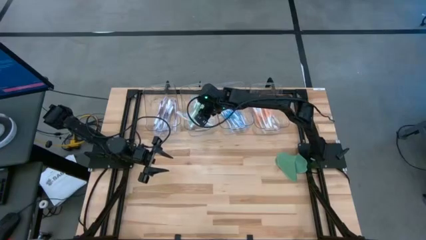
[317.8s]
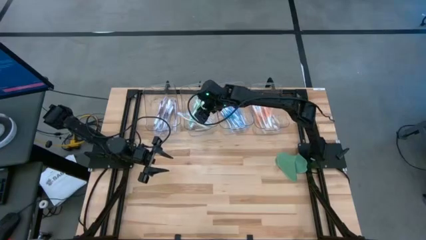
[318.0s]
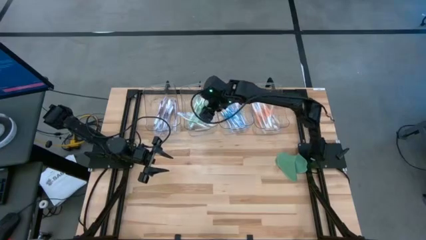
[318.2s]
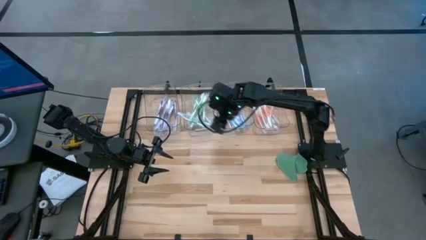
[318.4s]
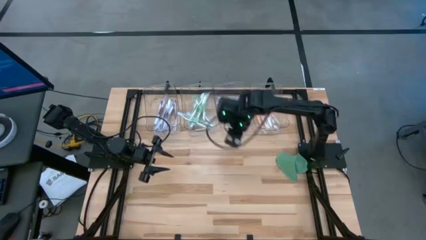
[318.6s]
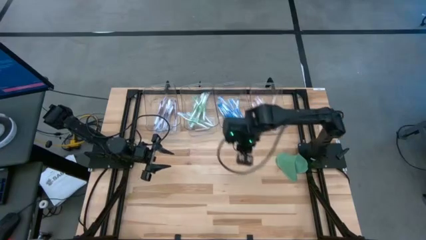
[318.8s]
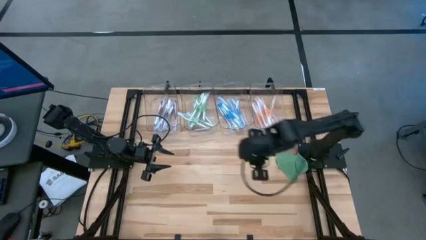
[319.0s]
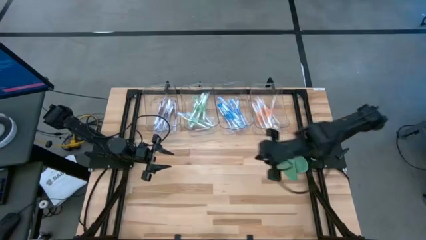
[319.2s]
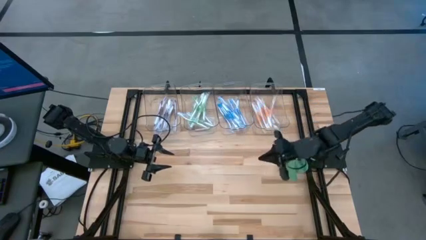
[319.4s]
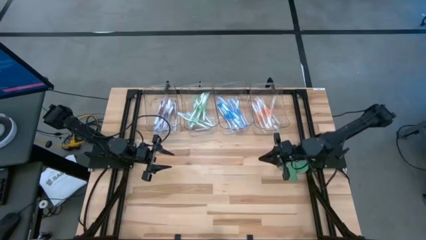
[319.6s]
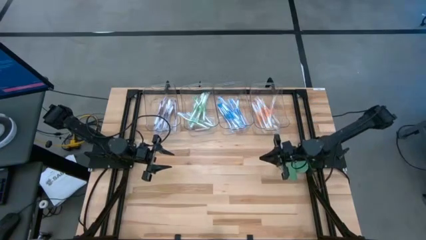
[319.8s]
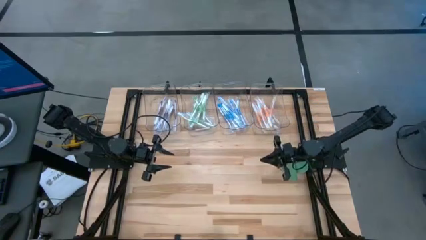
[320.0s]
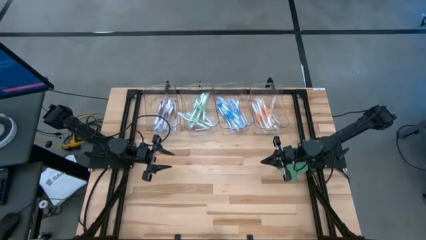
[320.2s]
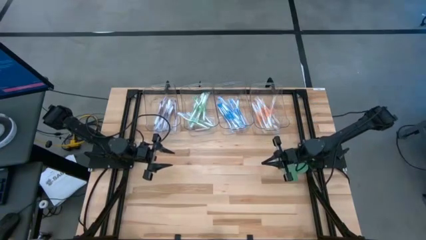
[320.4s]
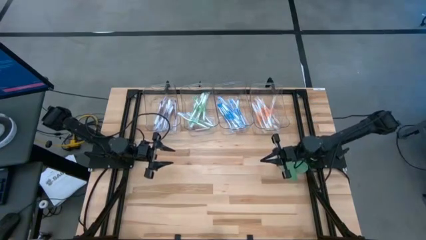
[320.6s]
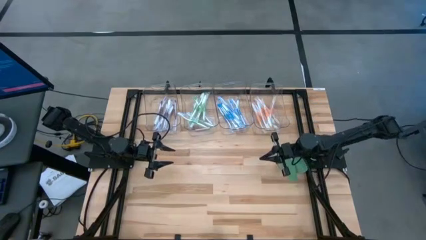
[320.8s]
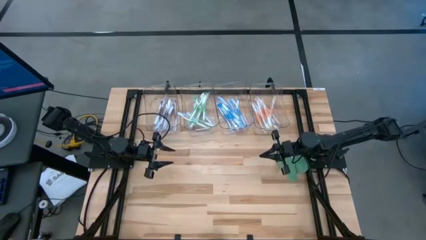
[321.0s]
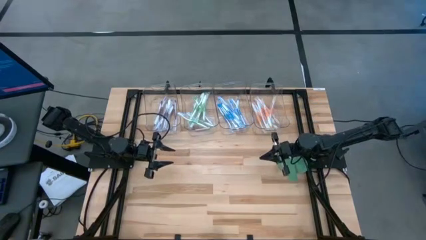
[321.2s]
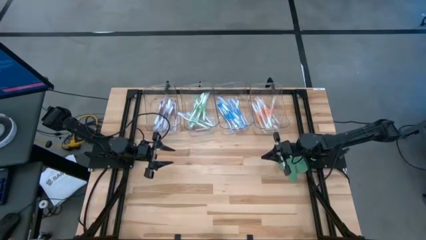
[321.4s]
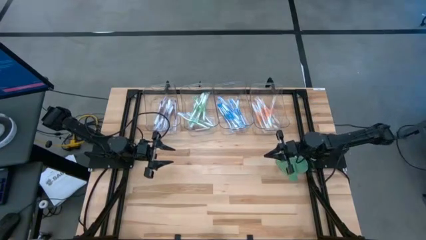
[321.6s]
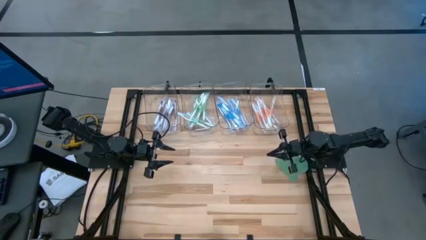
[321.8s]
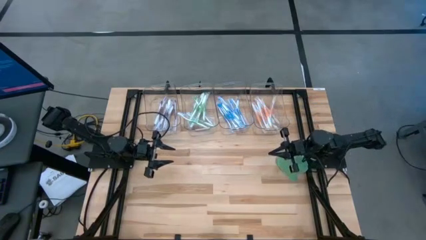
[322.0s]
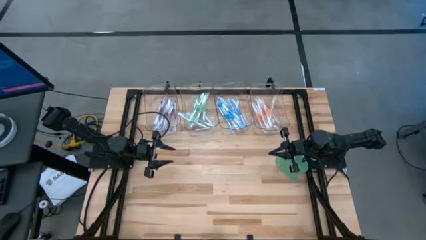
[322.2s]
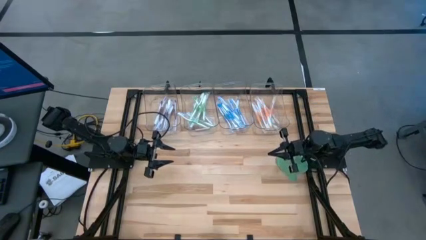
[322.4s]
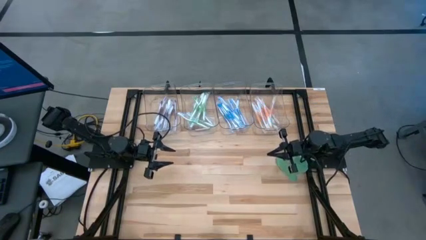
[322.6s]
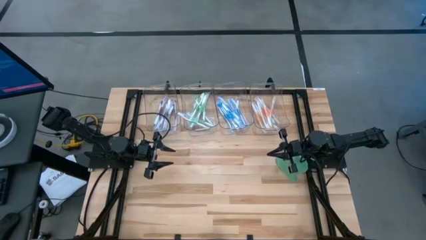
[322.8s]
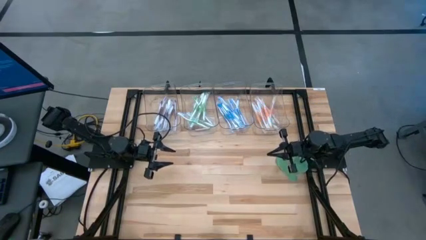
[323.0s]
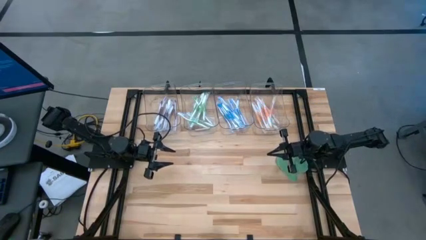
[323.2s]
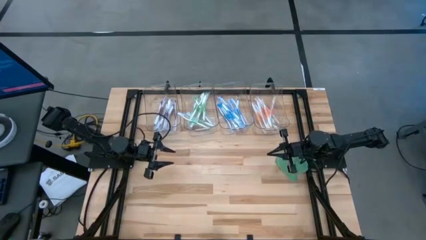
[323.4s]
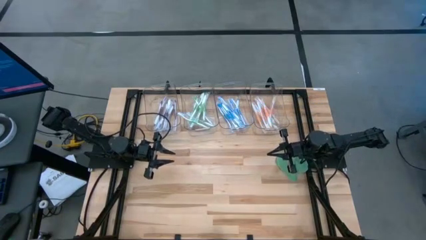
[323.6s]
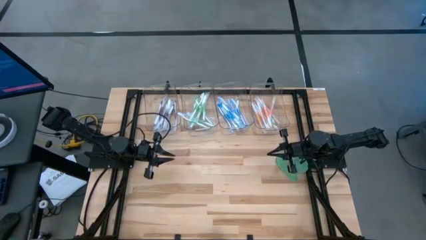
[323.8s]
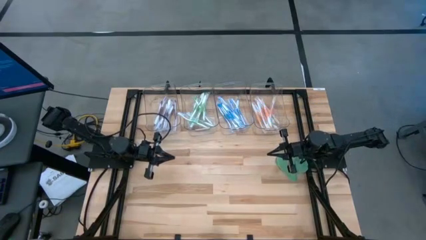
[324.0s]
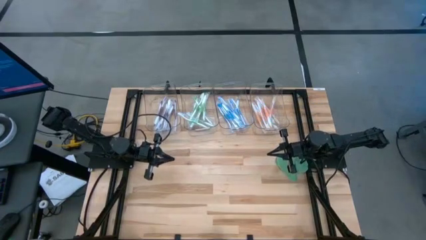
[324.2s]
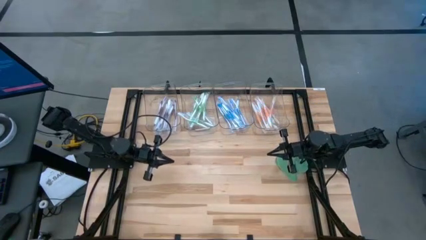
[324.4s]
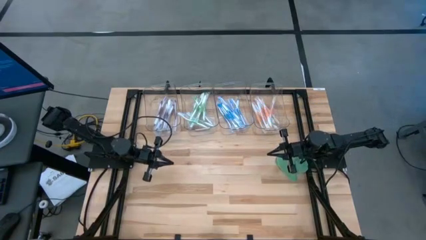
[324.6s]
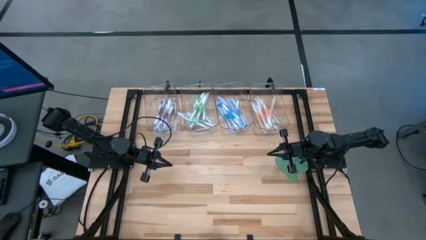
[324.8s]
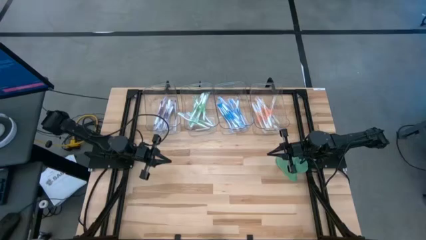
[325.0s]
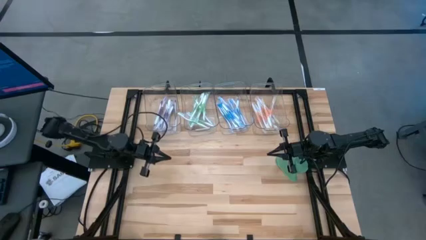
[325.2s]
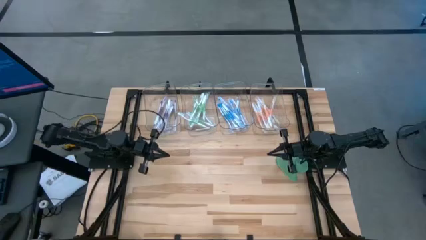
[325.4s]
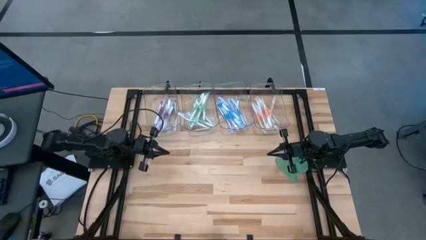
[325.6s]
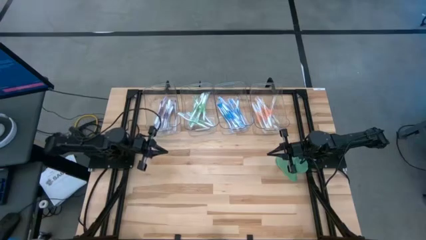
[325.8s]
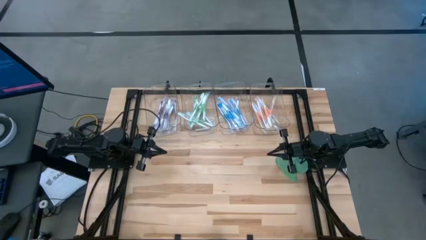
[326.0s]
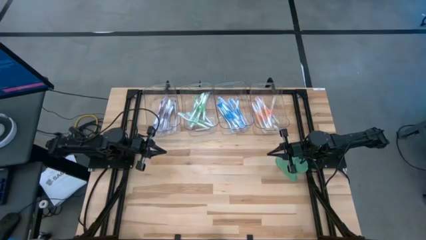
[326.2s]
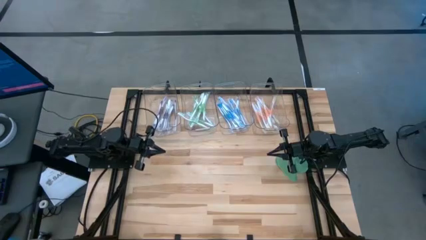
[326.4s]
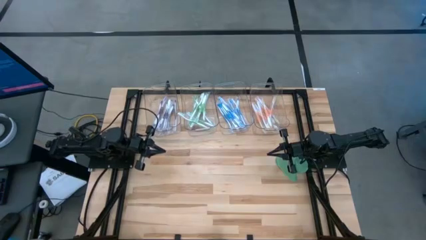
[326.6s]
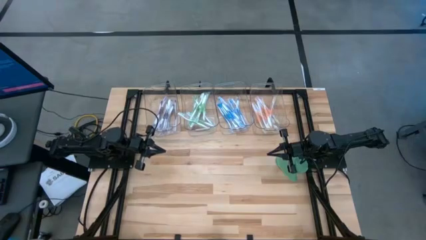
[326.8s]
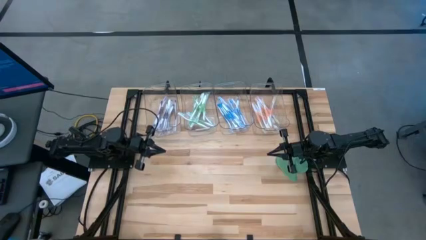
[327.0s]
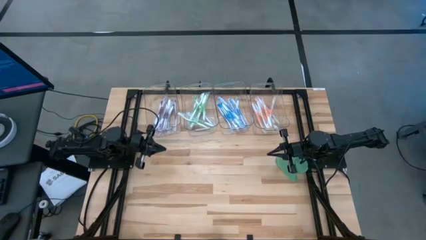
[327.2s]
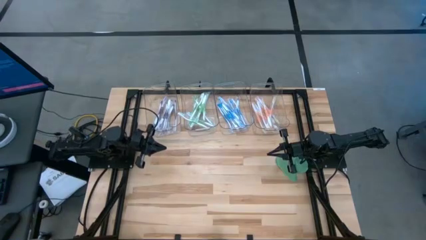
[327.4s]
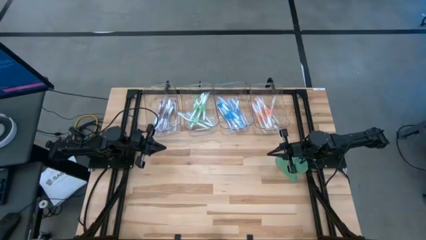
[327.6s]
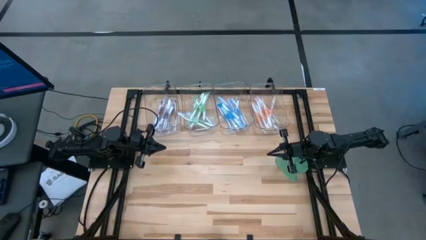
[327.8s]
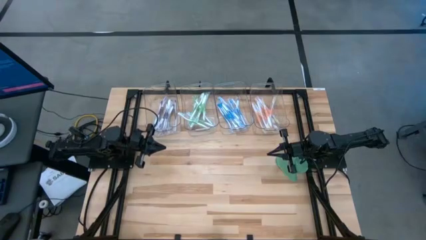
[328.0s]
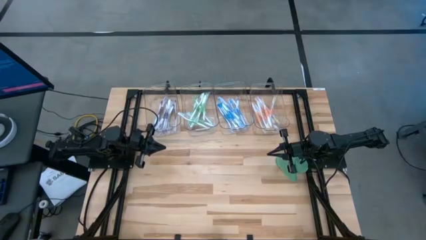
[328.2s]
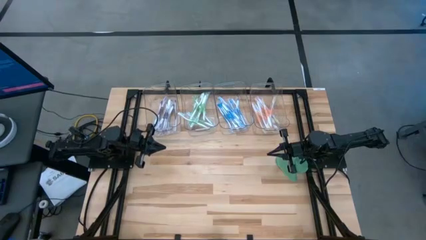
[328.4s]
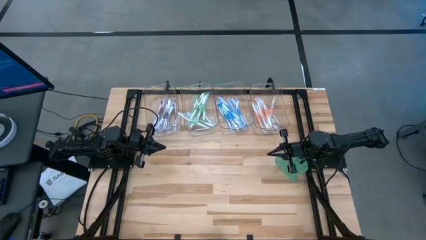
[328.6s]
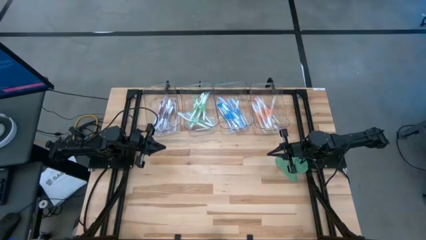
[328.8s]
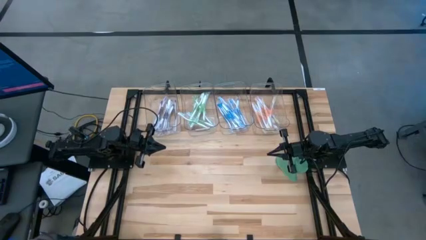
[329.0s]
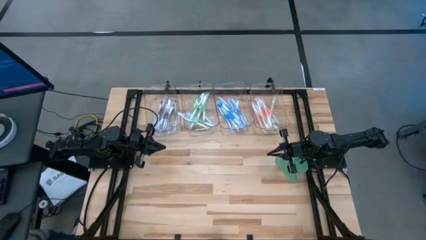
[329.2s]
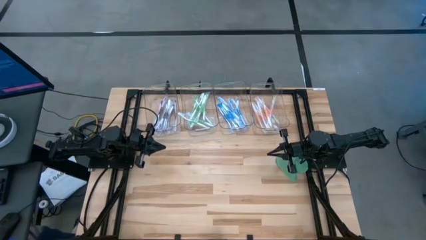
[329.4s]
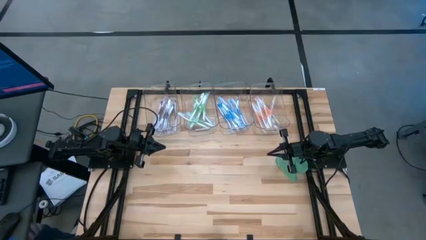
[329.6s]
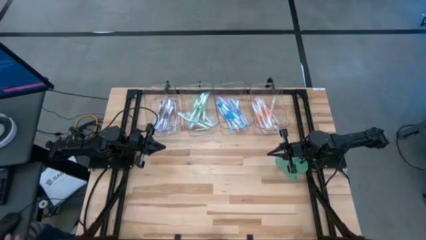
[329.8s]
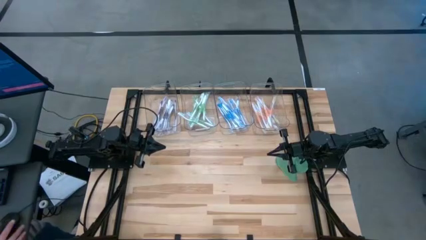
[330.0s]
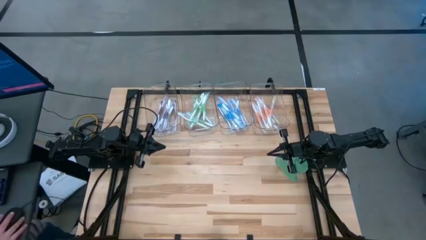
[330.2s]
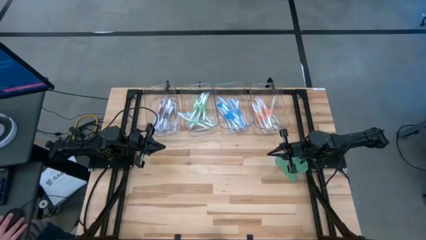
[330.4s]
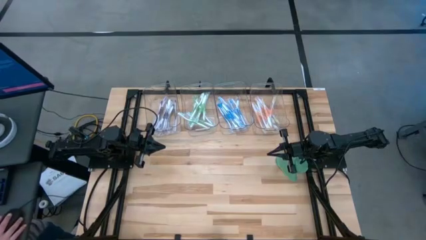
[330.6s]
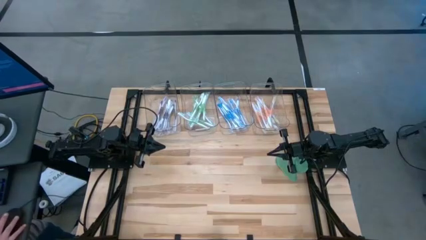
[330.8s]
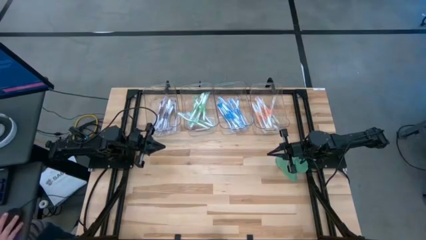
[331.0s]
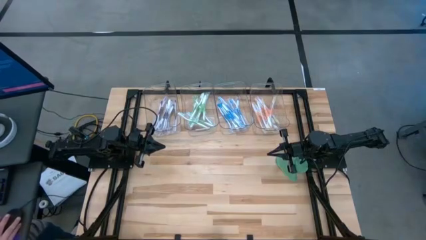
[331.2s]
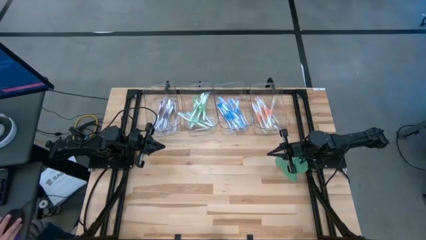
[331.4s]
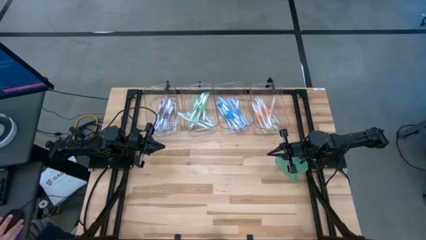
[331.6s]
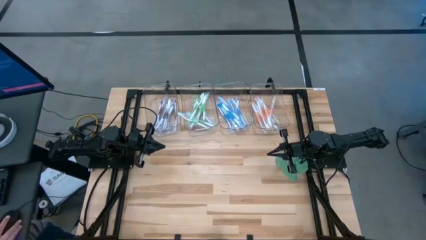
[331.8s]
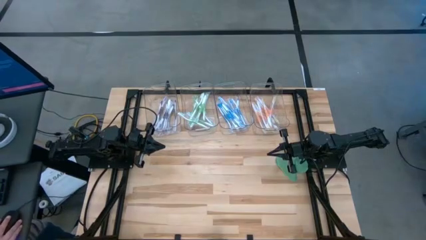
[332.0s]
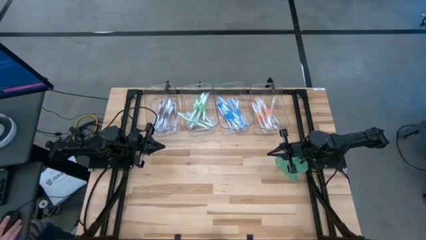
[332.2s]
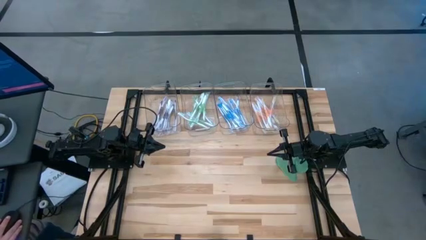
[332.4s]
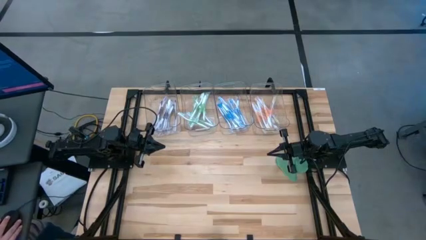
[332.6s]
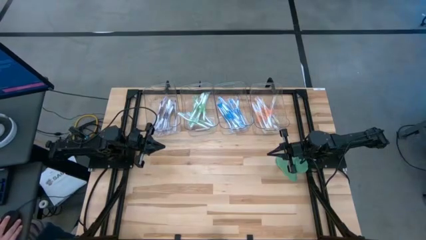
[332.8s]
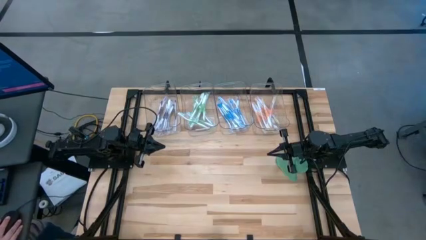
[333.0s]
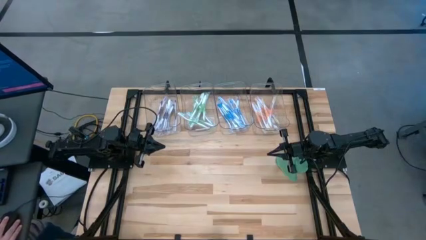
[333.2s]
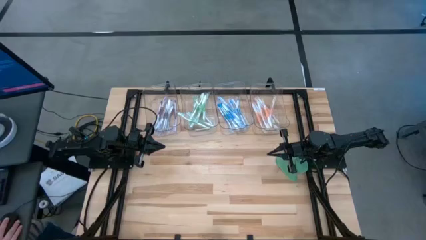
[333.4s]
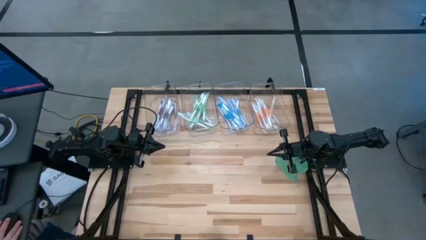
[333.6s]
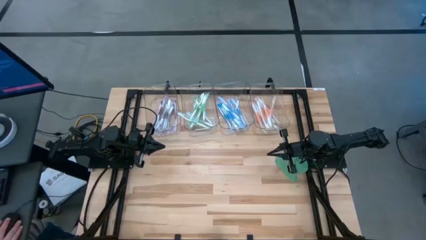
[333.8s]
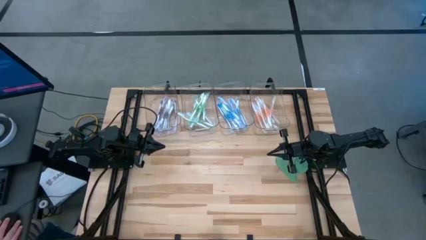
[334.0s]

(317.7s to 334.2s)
Task: Pick & Place Toothbrushes
Return to Home Position
